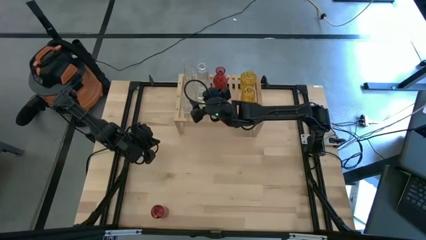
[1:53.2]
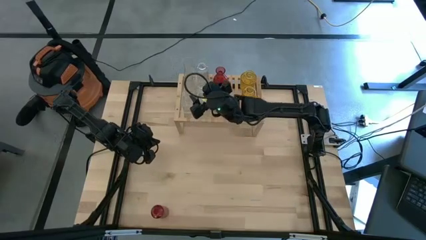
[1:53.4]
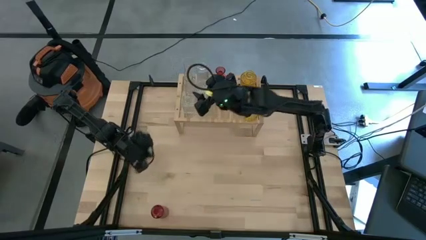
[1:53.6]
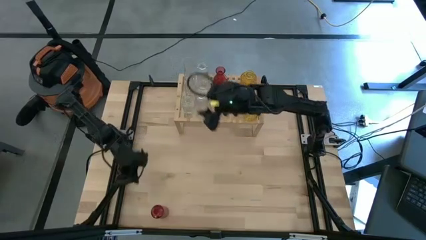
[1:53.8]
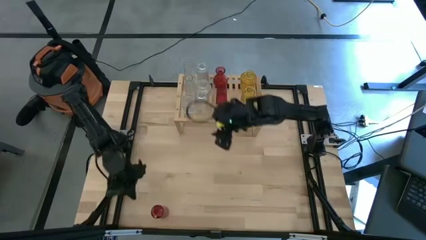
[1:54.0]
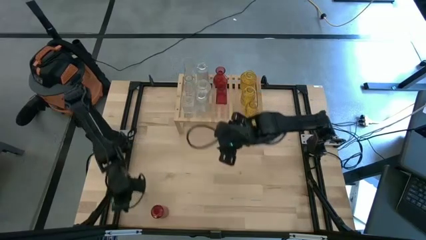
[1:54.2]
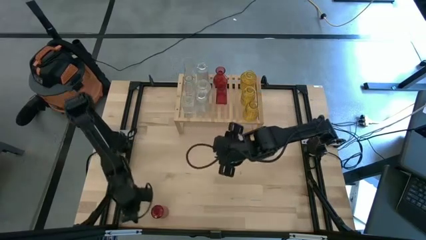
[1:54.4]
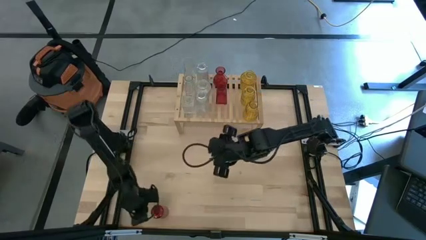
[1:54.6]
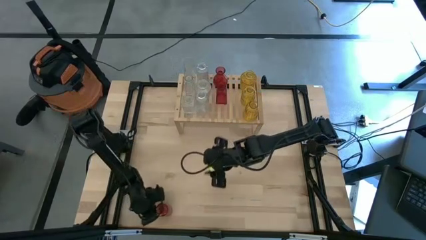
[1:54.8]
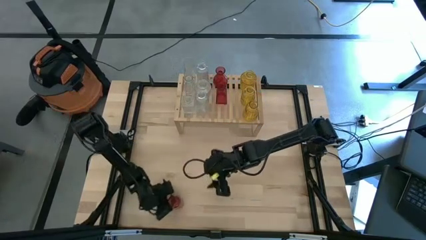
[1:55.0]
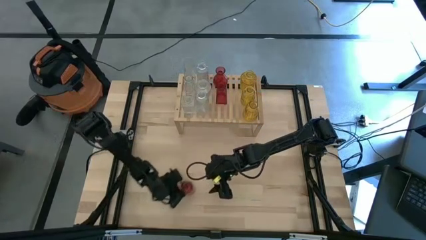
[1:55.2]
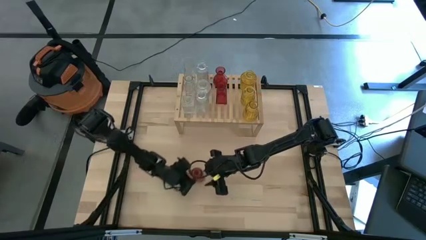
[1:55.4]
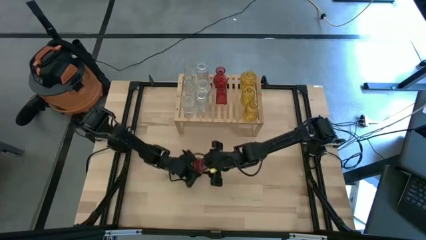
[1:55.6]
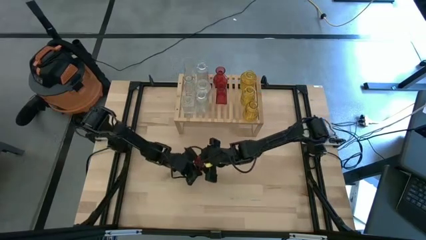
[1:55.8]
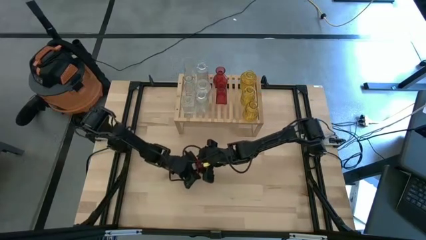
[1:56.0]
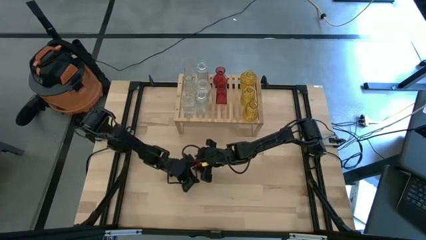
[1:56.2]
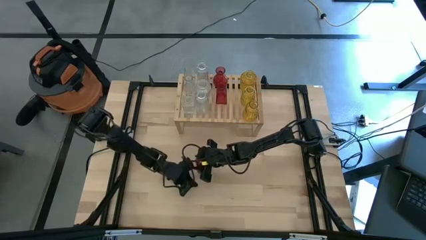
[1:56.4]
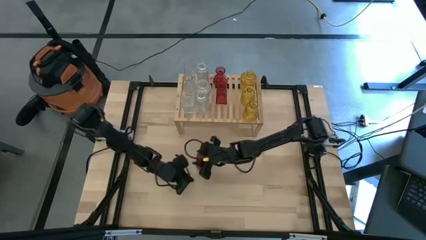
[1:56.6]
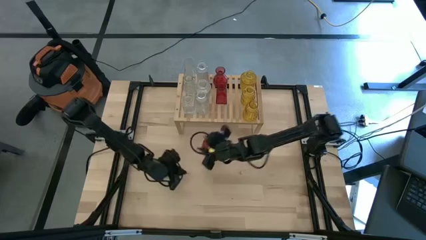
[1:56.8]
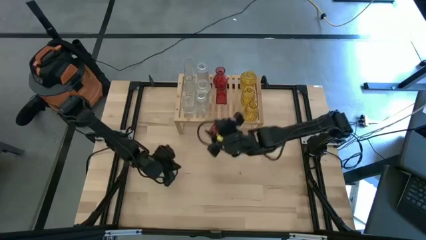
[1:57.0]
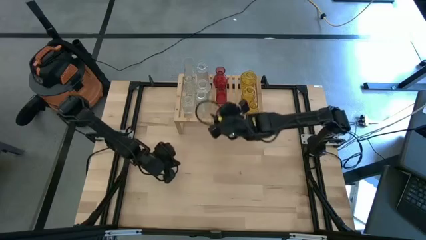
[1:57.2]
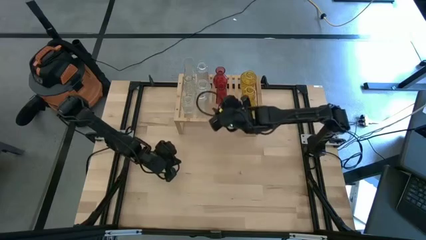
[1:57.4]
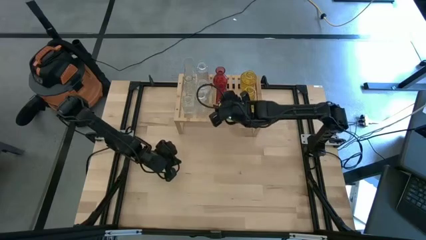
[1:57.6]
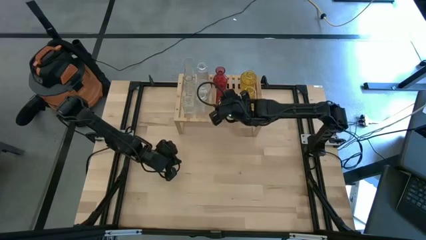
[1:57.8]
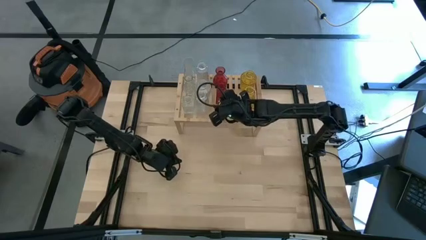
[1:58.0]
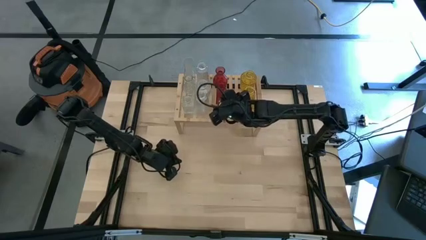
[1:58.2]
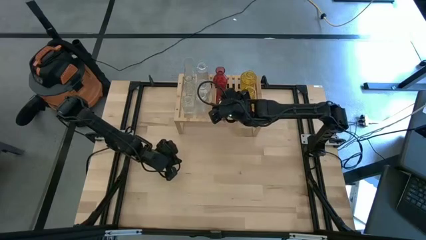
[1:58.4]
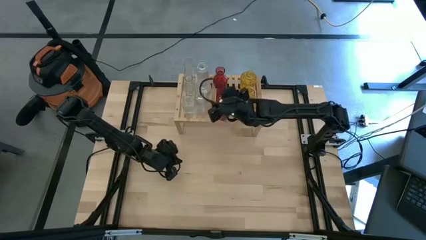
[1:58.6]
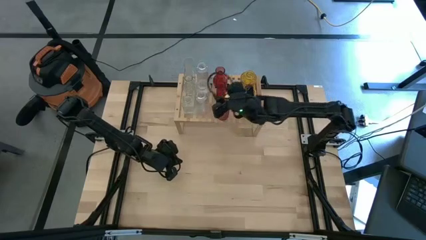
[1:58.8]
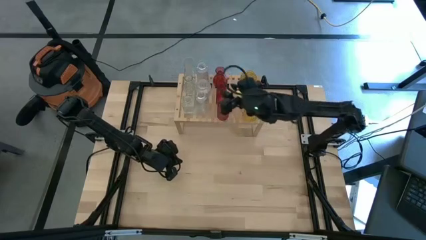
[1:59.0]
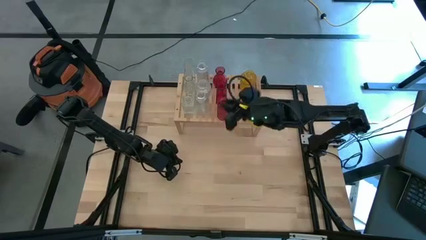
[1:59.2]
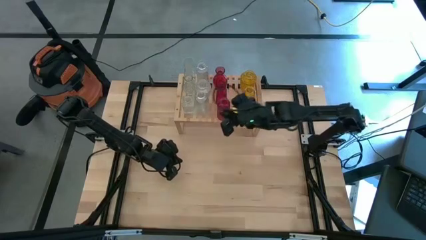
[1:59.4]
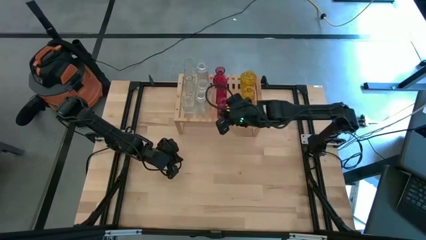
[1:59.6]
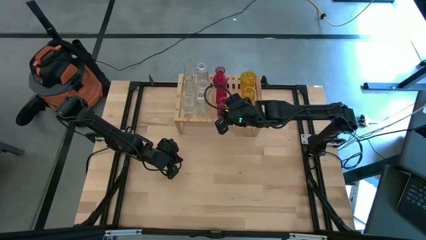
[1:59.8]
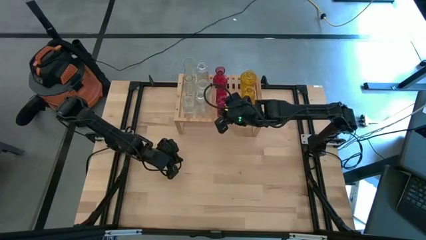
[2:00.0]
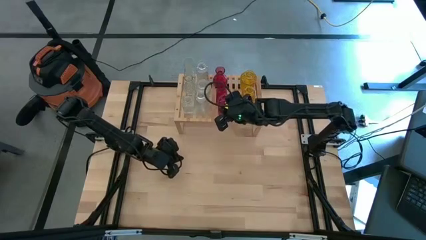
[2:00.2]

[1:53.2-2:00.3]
Task: sort vases onto shelf
Put the red vase on the shelf align with the other red vases

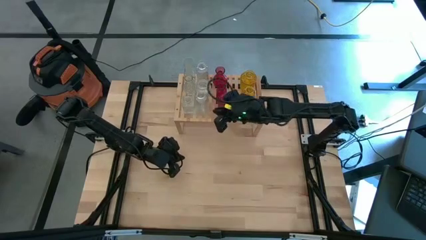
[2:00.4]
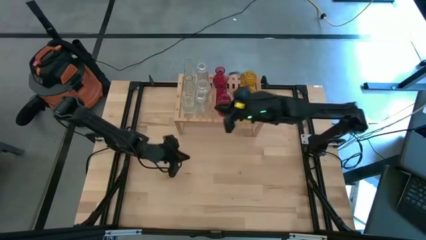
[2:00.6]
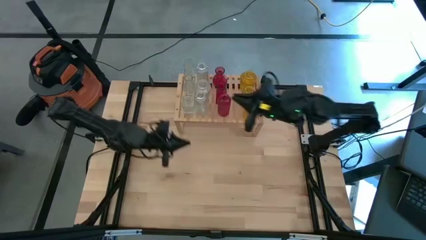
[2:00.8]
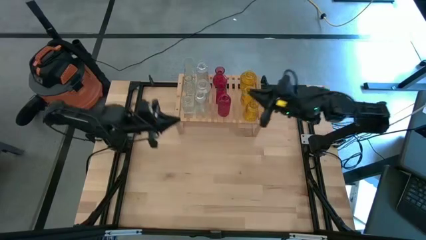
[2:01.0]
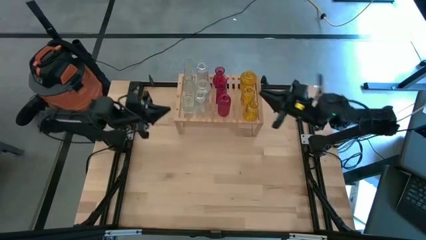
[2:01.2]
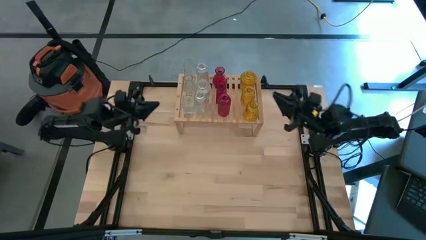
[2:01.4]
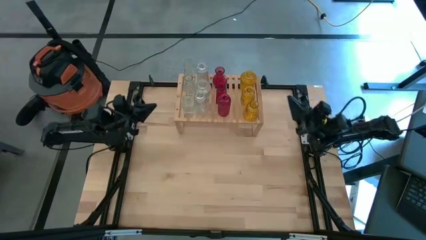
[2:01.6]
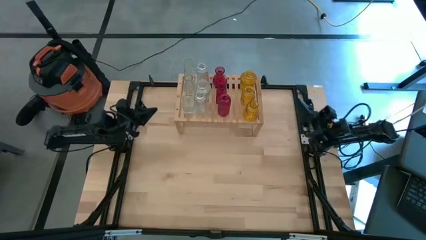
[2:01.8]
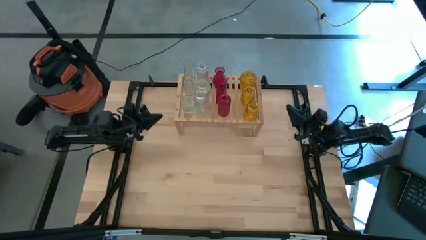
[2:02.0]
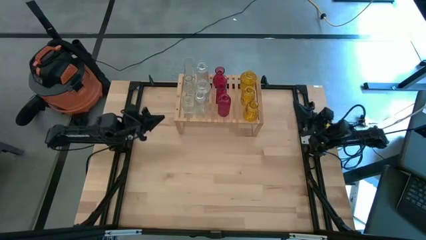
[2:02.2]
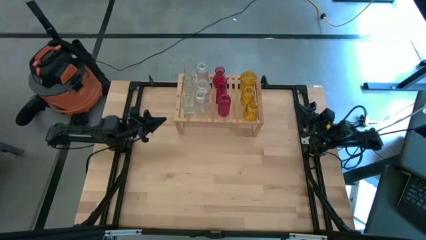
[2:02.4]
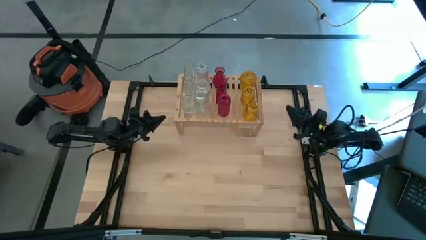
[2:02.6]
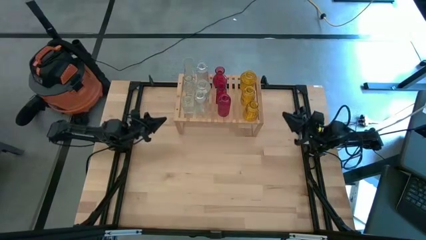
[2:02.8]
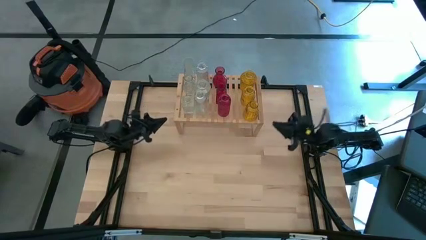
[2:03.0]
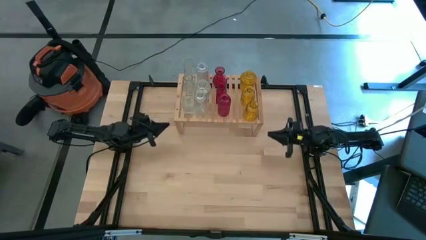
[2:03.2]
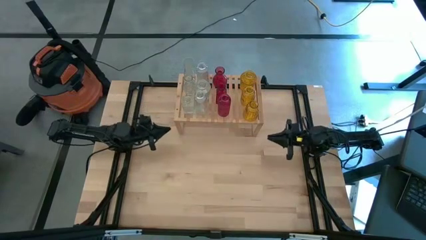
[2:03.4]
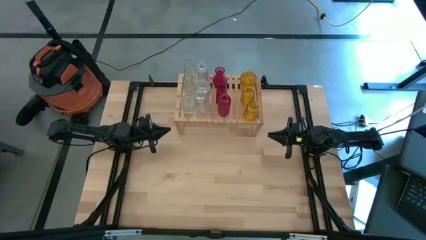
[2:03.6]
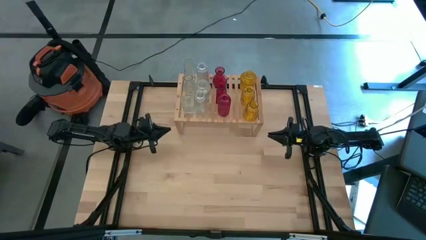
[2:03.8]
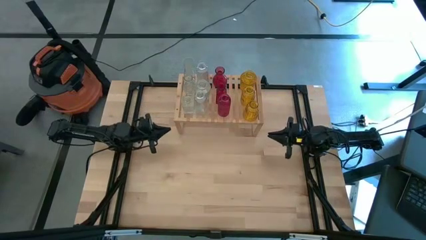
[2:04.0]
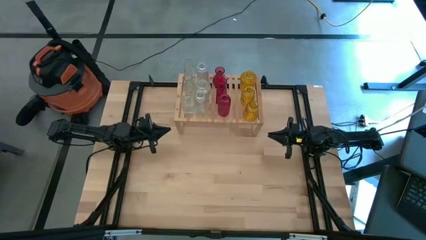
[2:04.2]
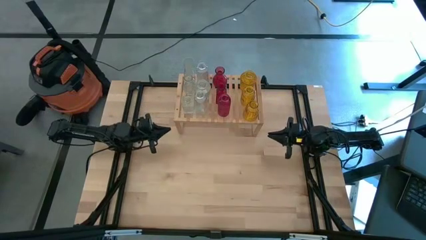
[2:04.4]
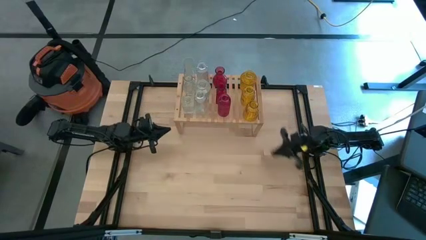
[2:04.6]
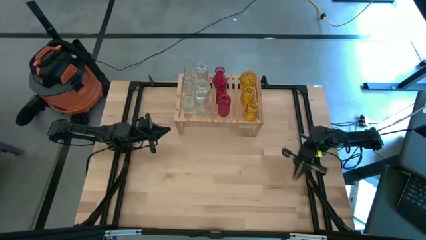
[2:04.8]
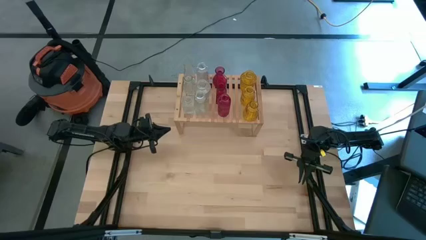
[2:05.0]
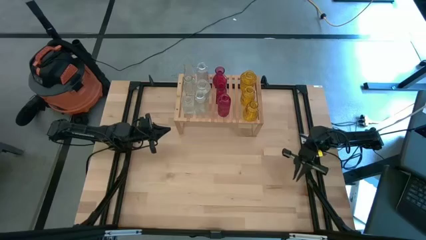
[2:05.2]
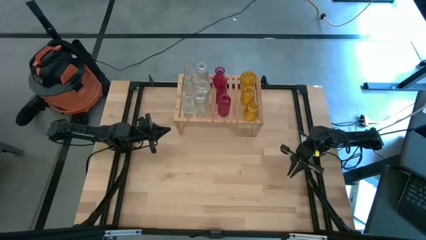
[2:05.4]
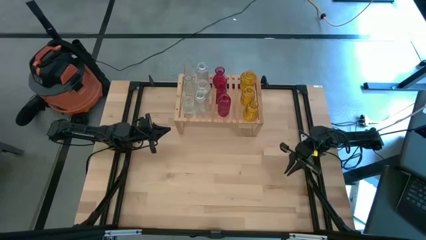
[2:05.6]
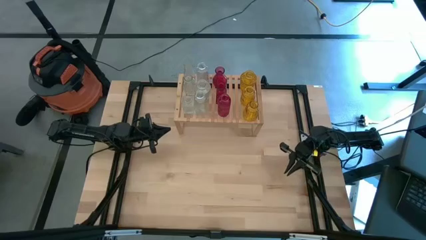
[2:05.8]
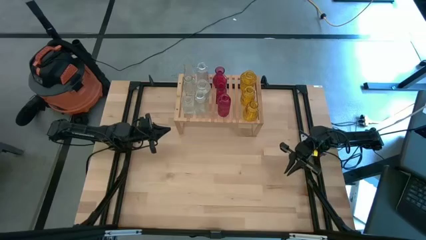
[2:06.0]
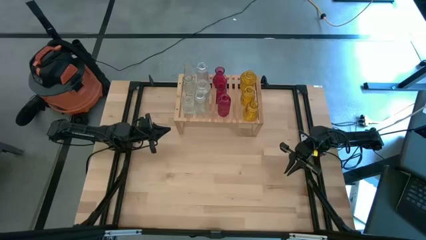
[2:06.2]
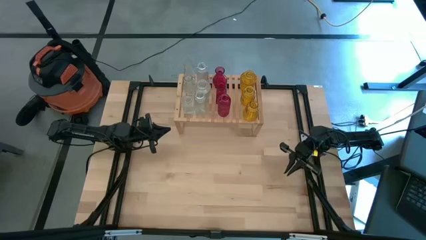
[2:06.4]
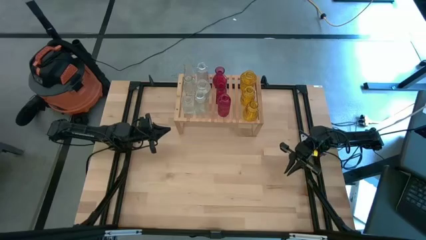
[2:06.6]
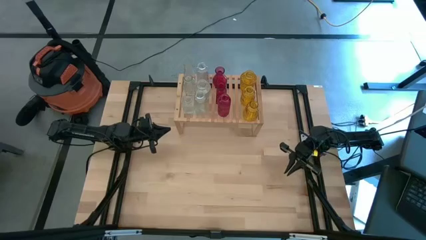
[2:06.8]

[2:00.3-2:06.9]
Return to Home Position

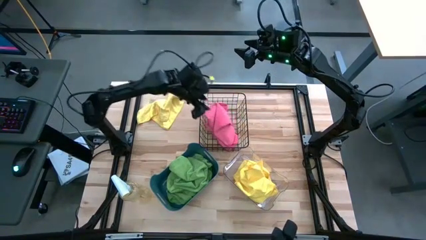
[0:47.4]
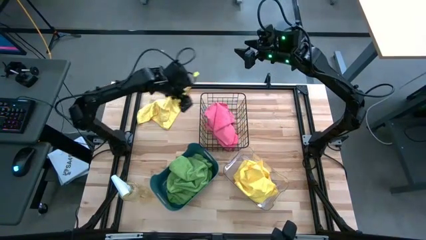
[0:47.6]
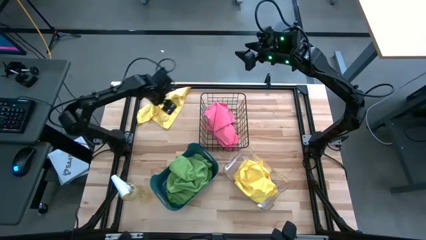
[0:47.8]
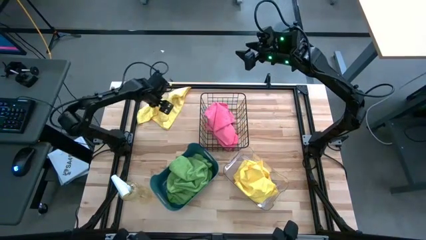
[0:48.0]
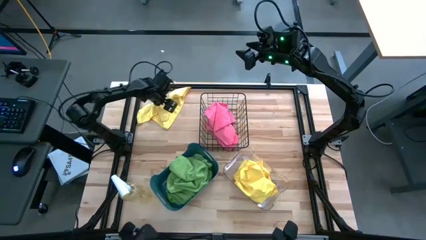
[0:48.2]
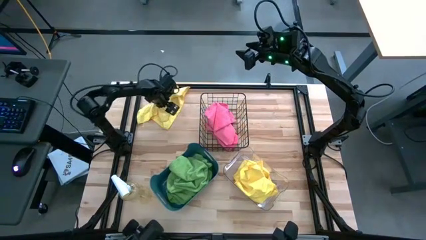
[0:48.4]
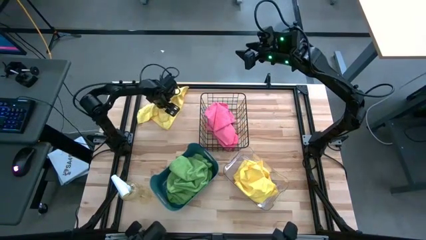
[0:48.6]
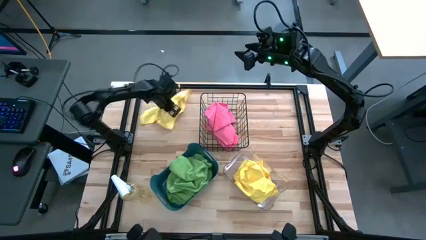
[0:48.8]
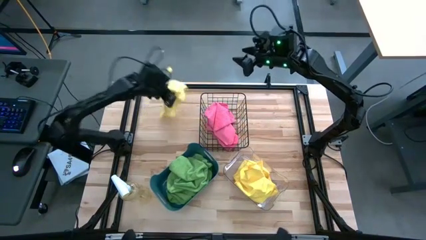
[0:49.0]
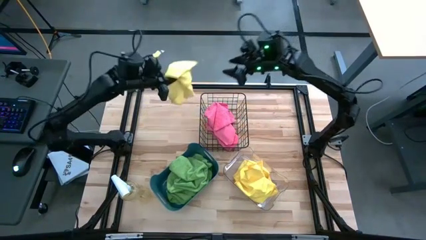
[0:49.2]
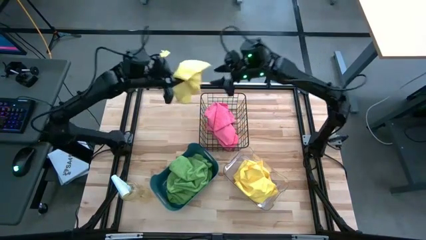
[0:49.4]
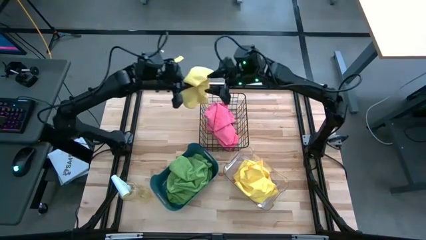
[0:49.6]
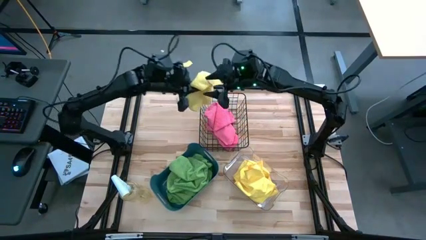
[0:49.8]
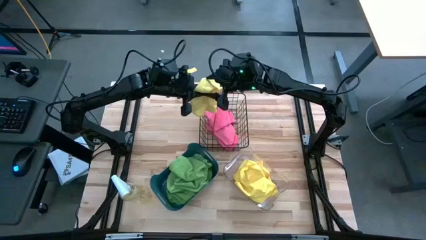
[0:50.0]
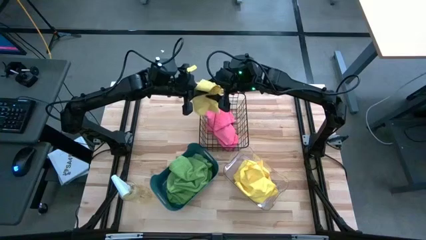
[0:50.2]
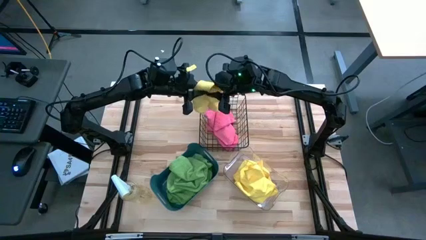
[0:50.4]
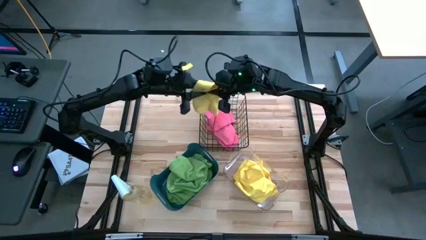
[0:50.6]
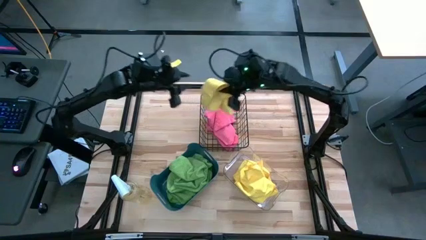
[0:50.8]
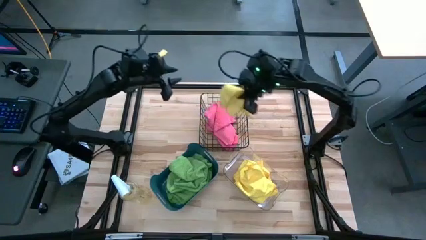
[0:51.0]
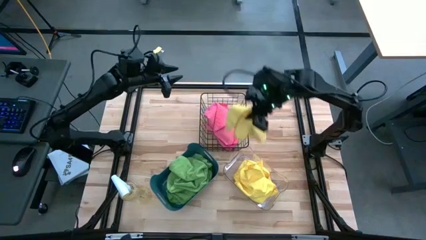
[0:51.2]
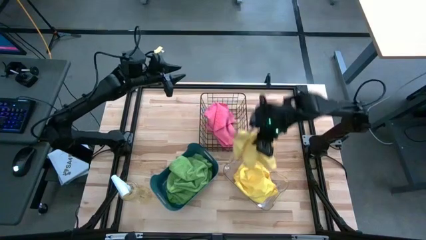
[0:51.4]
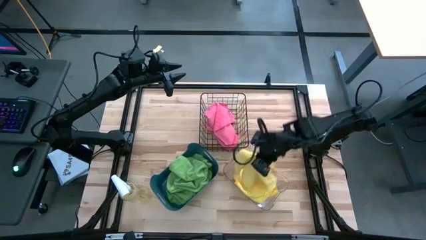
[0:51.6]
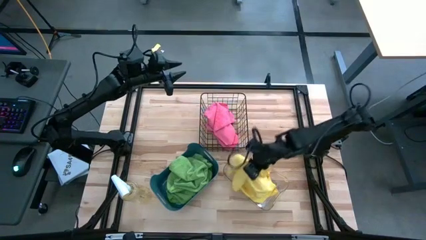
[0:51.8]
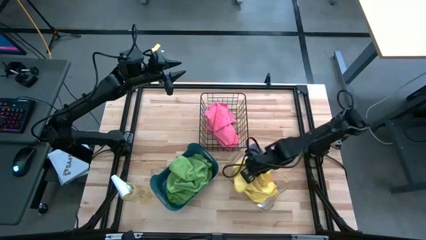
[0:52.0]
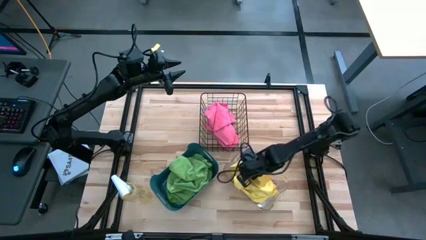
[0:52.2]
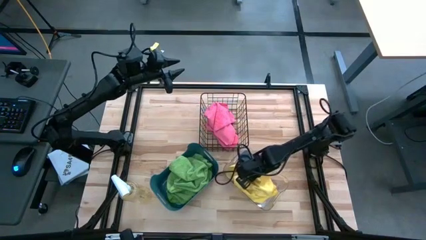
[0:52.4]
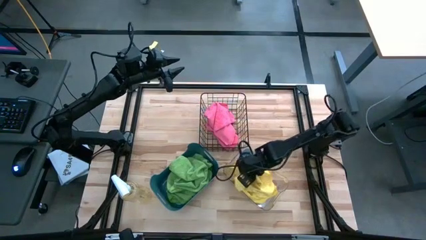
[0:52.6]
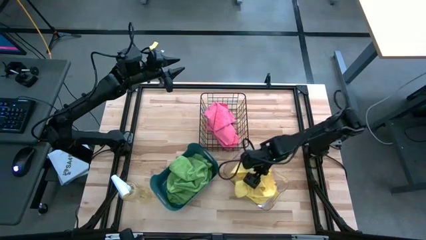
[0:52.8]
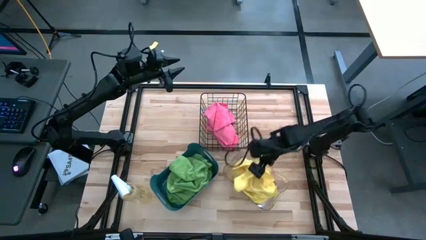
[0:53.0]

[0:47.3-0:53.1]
Task: Sort microfiber towel by color & place in baskets
Put the yellow towel into the transparent bin
